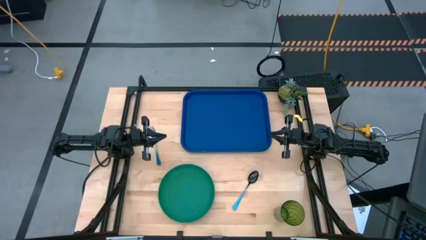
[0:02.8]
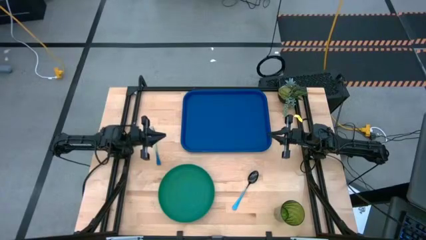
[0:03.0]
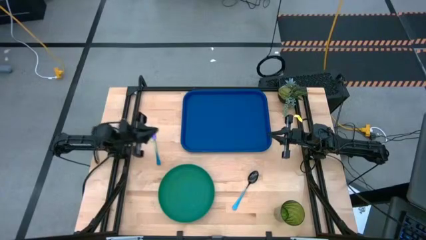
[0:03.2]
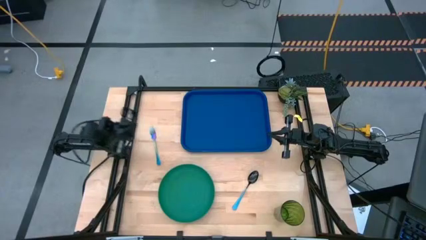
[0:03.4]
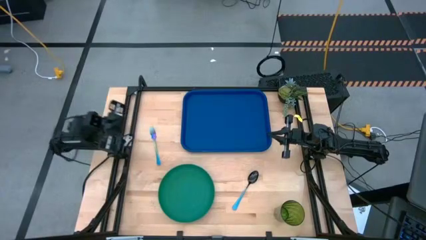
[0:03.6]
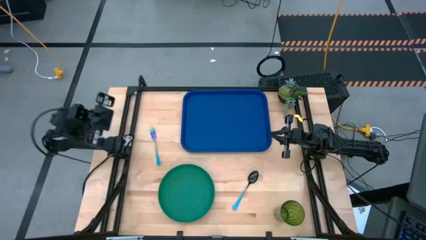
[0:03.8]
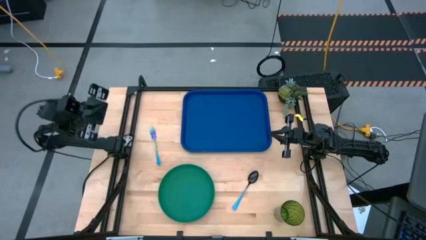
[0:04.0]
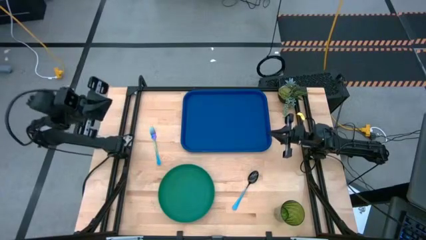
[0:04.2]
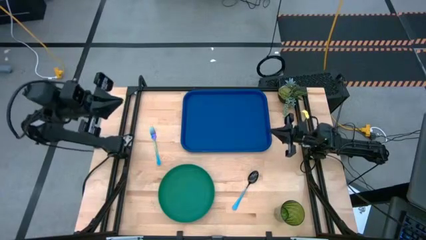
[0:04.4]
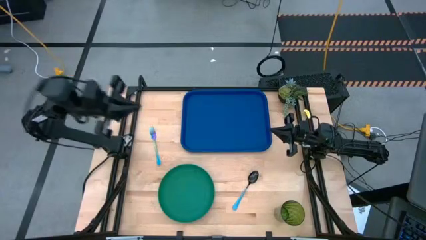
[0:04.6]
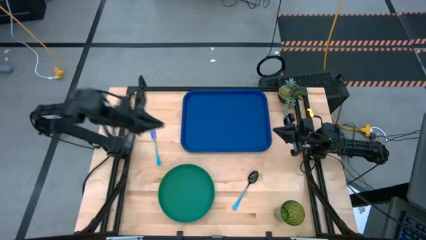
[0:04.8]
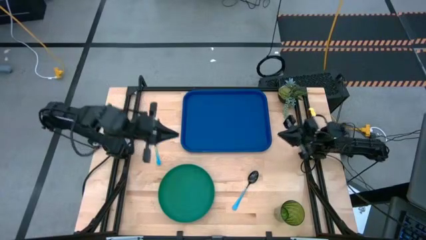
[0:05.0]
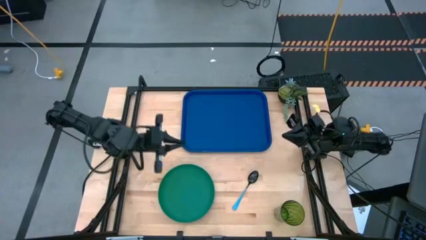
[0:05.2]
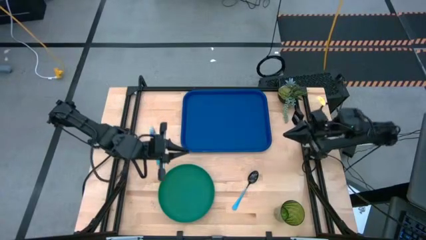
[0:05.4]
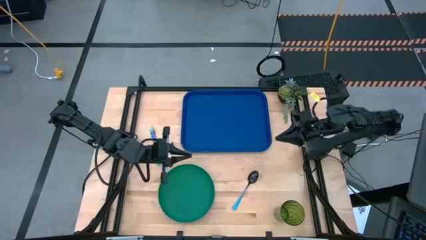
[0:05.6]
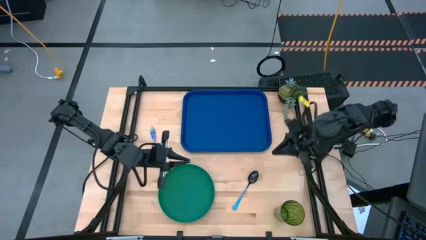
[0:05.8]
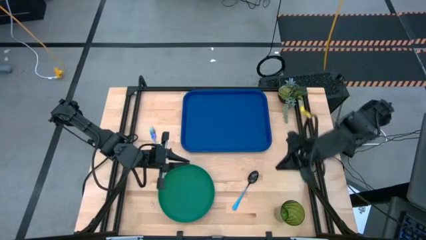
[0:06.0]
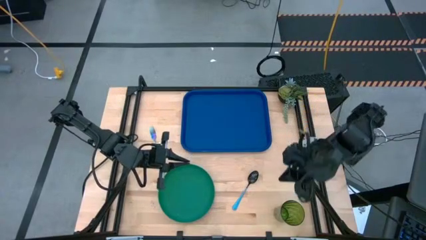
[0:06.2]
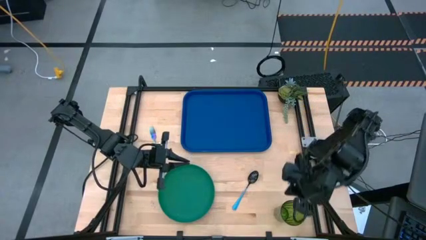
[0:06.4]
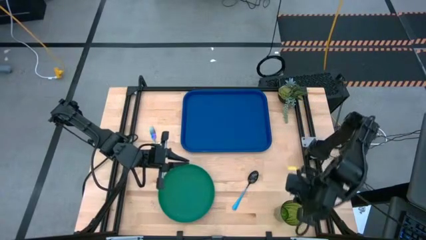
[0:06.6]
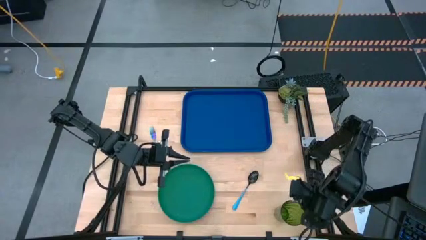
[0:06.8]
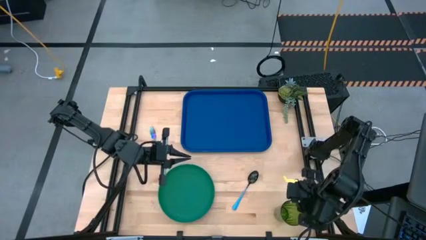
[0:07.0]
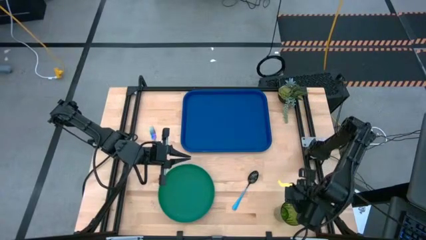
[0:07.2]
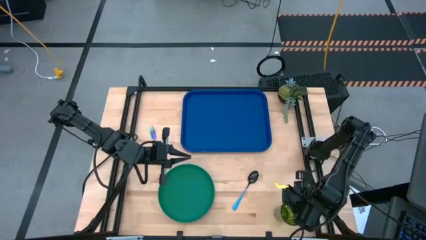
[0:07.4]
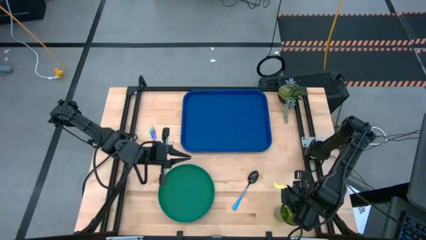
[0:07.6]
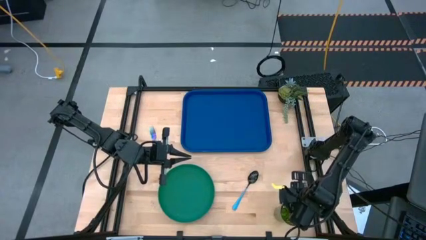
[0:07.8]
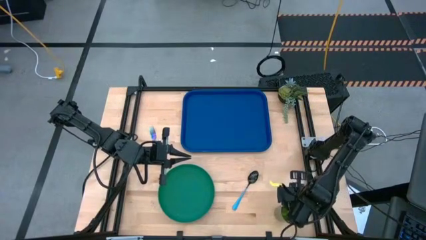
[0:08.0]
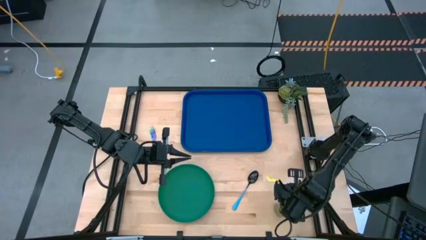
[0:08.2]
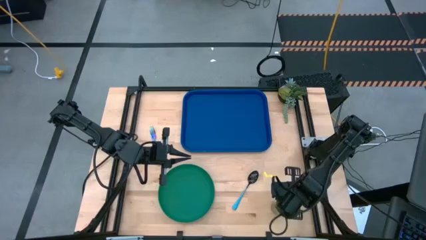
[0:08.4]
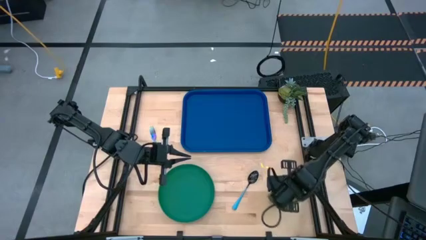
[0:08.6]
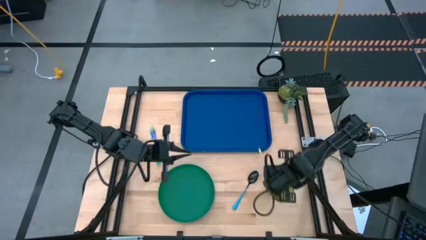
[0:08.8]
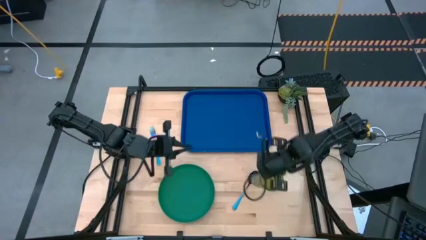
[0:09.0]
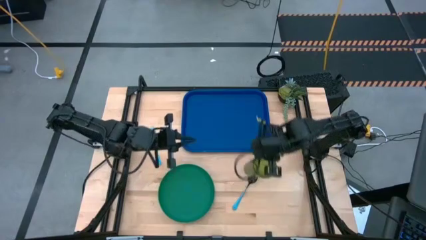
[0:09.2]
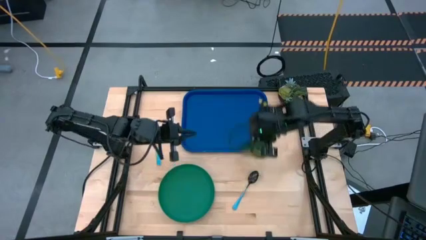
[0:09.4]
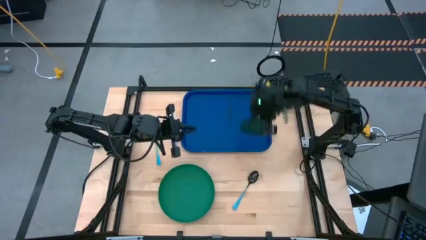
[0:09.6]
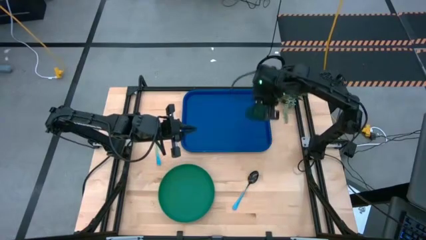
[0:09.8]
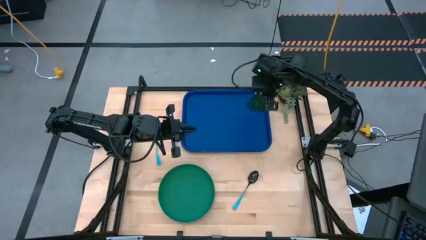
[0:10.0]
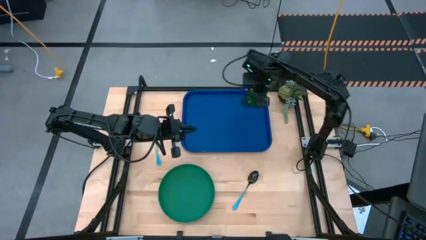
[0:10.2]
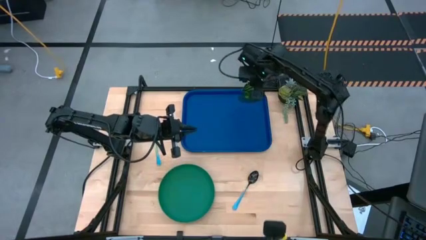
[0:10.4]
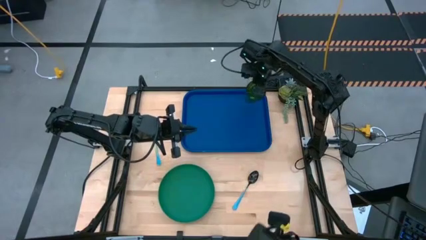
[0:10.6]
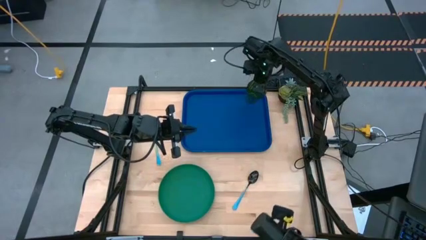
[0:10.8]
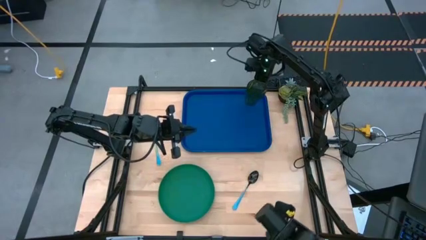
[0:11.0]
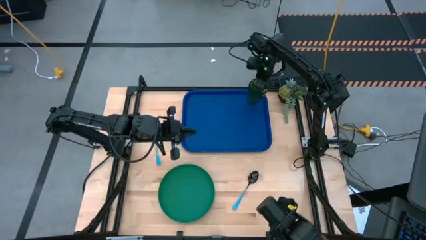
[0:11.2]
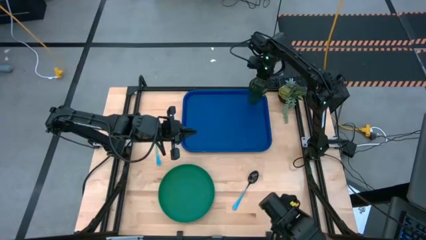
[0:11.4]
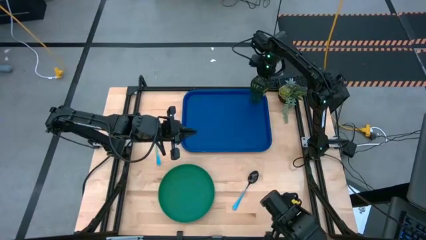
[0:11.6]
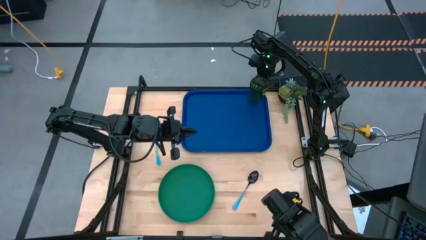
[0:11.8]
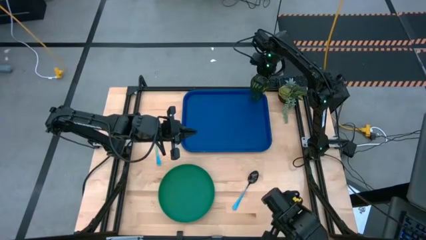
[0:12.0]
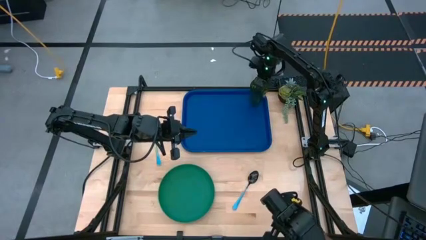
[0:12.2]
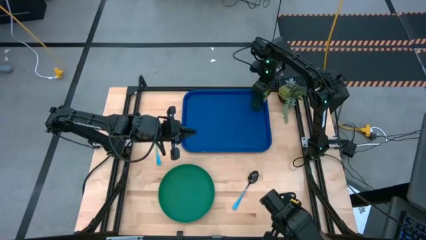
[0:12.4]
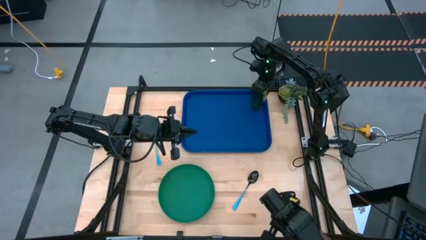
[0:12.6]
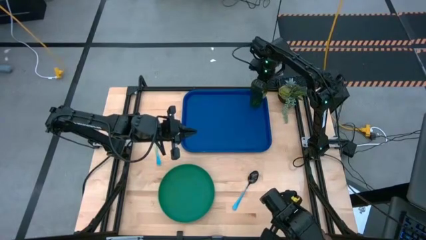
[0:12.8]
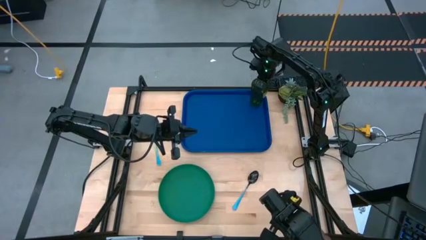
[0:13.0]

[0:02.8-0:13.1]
Task: Pick and place plate/cup/fork/spoon on tray
Put the green glass on the top right of the blue serving tray

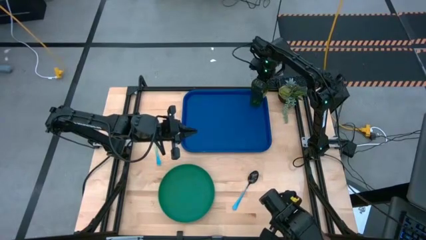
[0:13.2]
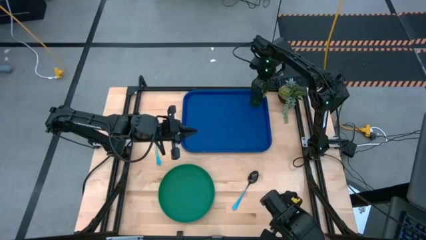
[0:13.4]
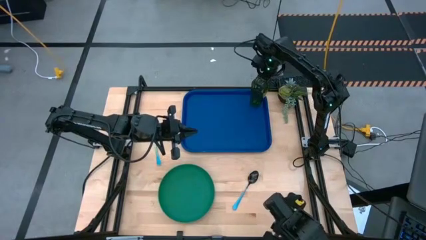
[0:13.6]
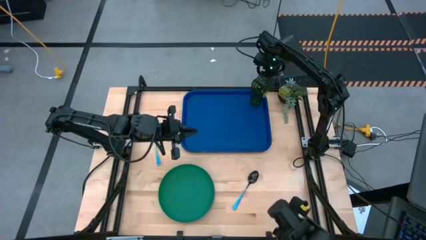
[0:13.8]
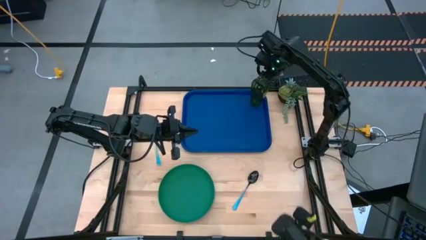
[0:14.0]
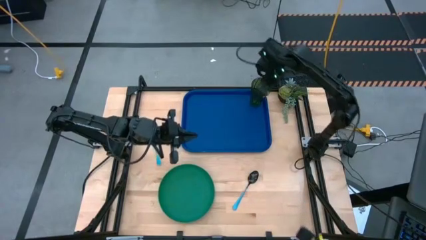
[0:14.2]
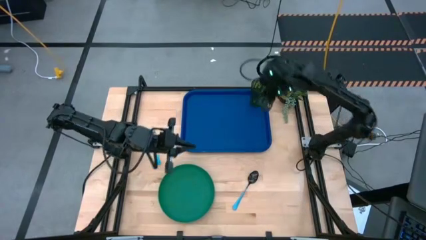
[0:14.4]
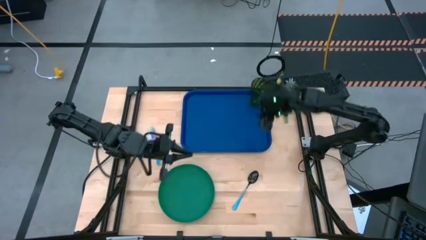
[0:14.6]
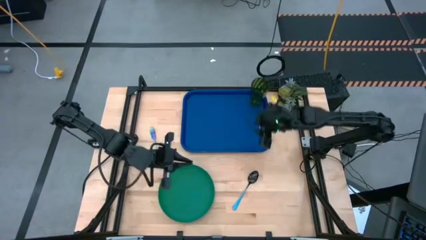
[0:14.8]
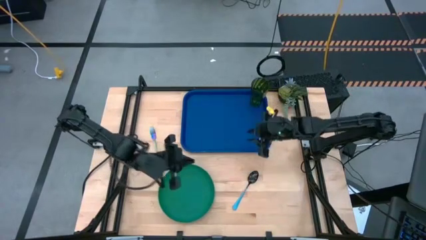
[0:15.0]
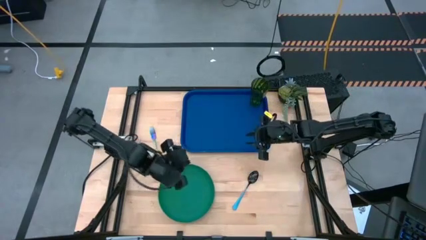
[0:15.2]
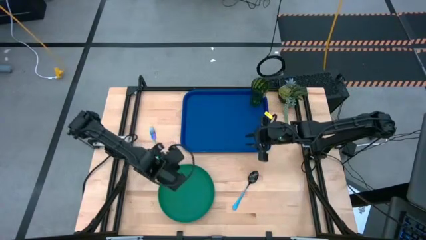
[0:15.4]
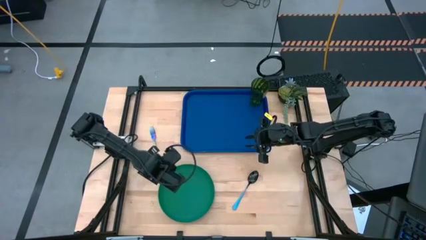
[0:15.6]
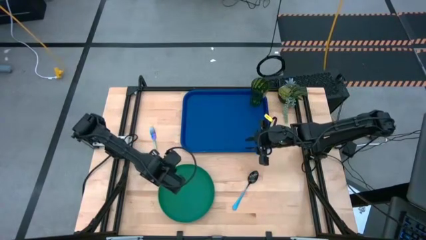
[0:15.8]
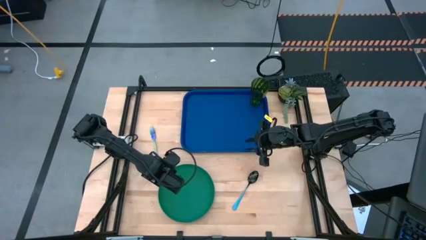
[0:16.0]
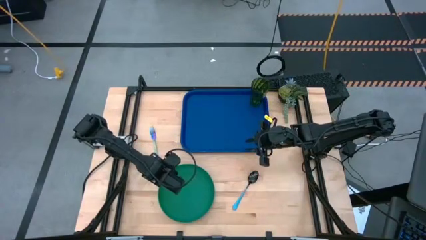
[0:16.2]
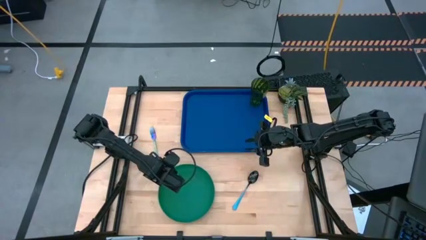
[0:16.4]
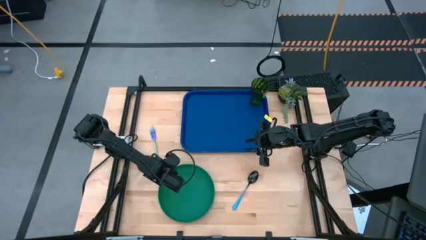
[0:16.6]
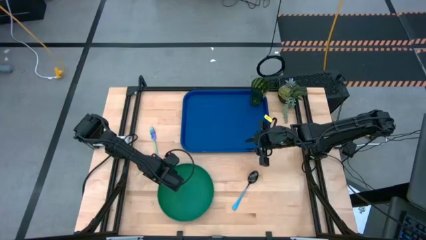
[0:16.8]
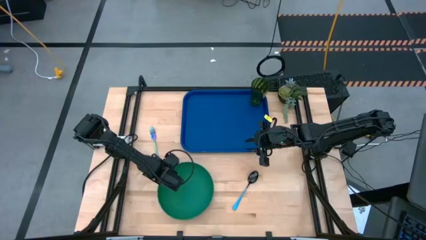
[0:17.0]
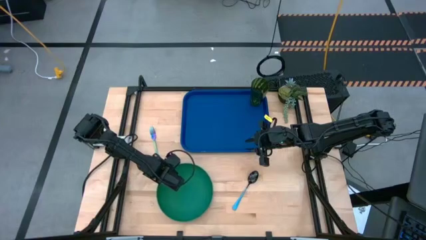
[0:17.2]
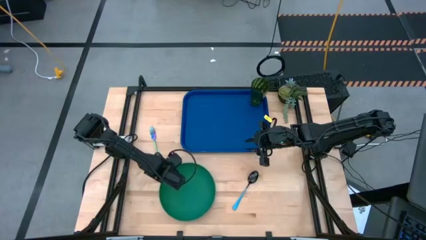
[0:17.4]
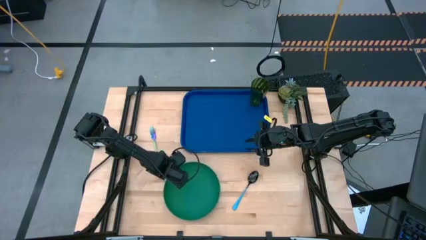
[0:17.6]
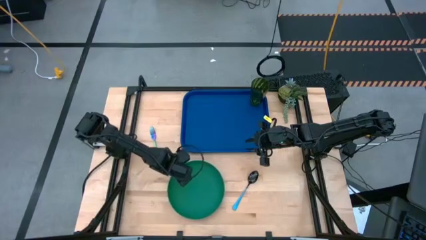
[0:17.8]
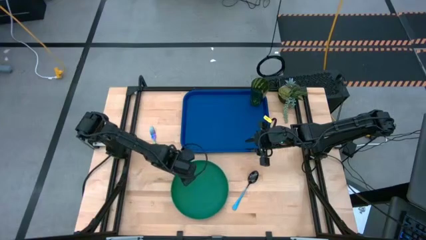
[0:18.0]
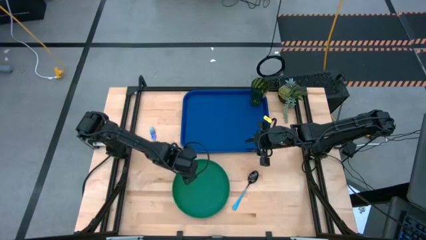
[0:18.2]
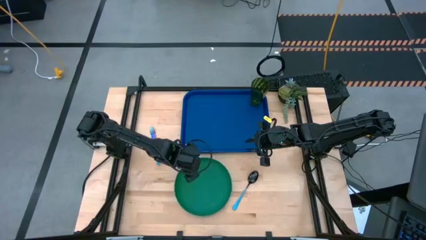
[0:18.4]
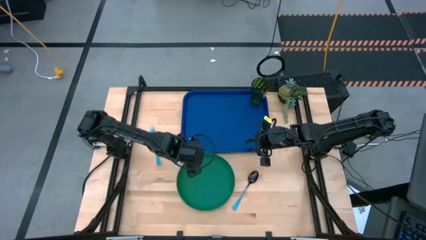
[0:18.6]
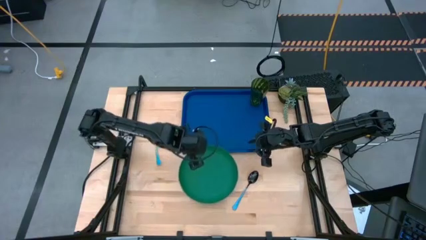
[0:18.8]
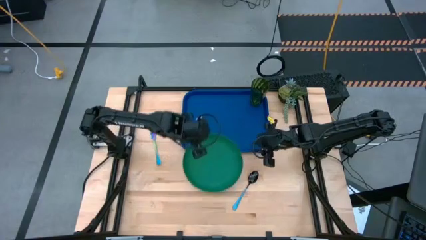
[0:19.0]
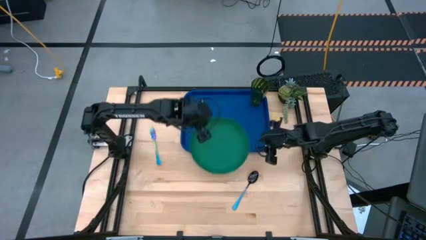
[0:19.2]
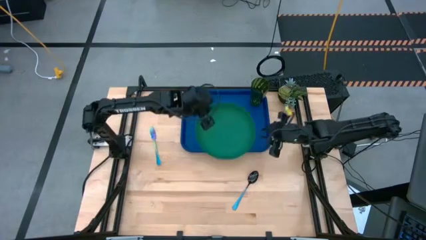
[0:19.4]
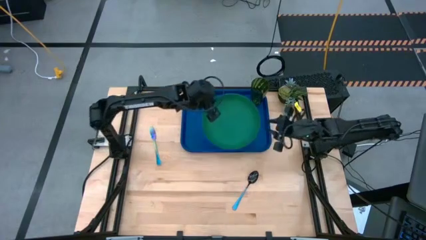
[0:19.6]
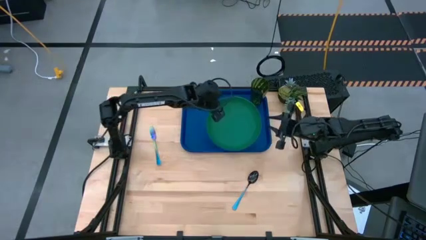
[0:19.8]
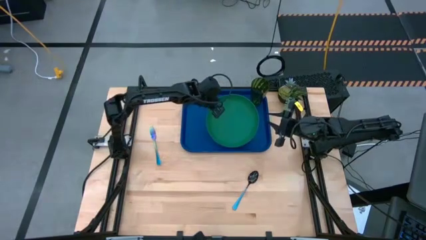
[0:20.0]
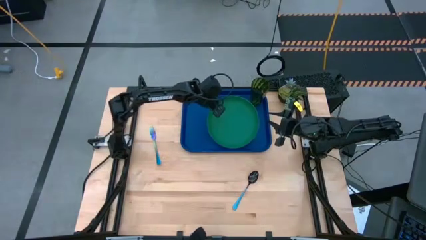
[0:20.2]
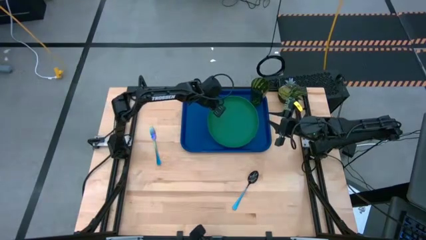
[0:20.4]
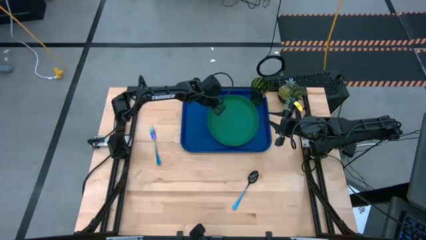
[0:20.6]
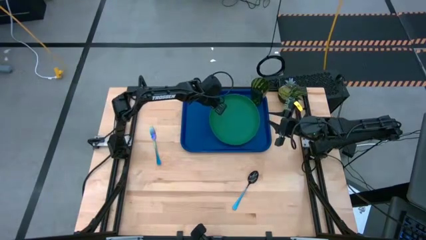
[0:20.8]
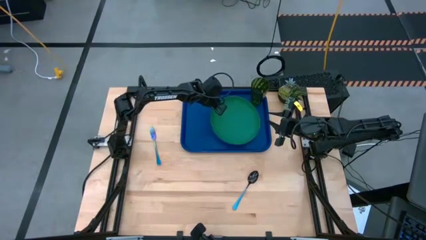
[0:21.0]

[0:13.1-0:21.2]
Put the green plate on the blue serving tray to the bottom left of the green glass
